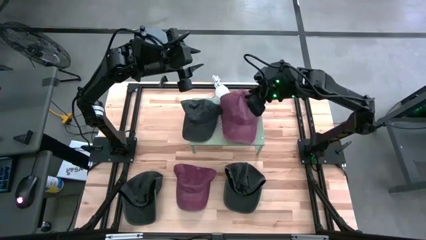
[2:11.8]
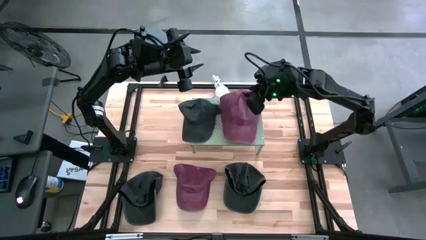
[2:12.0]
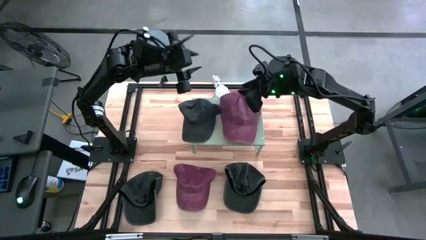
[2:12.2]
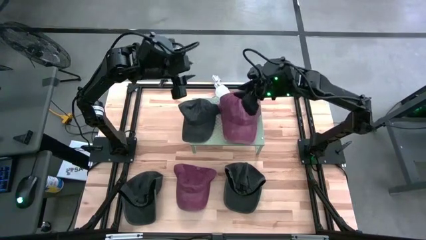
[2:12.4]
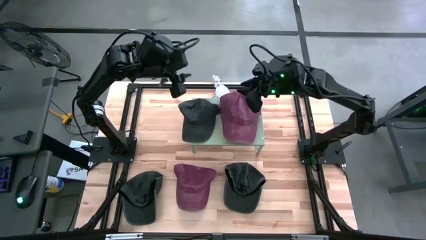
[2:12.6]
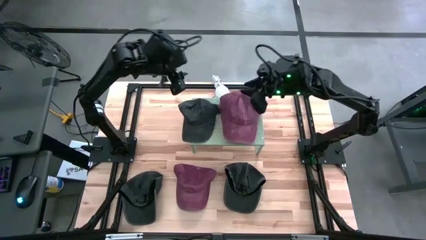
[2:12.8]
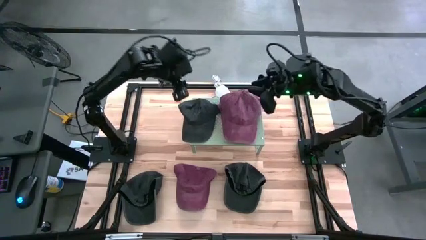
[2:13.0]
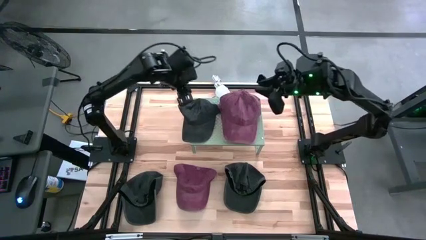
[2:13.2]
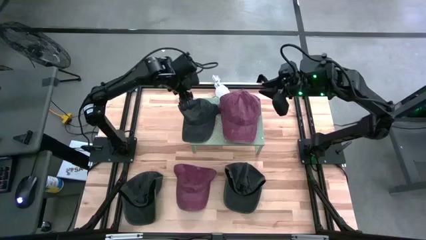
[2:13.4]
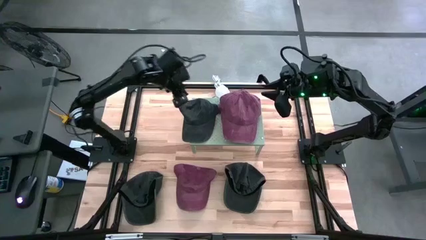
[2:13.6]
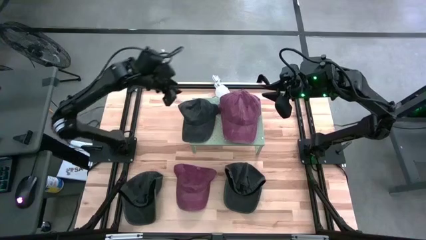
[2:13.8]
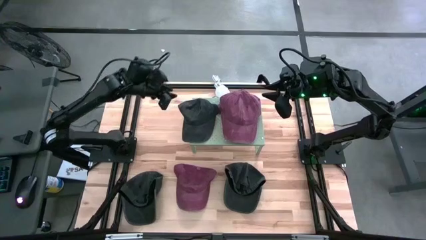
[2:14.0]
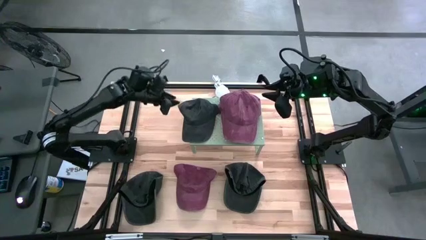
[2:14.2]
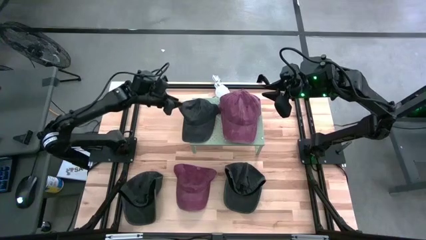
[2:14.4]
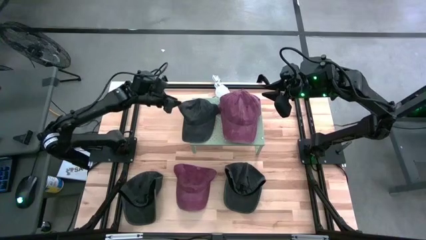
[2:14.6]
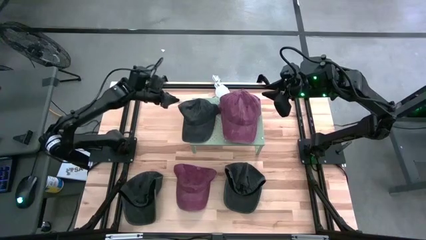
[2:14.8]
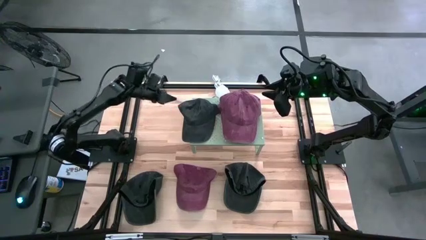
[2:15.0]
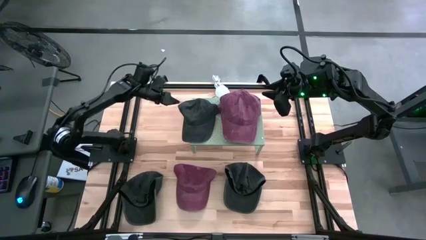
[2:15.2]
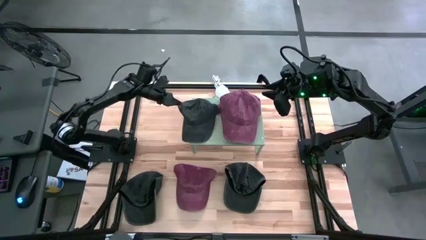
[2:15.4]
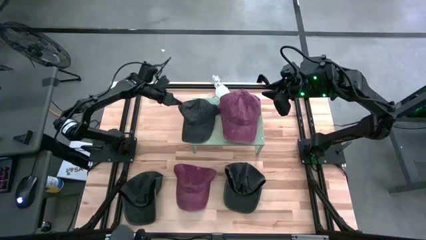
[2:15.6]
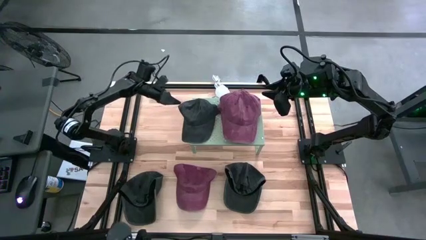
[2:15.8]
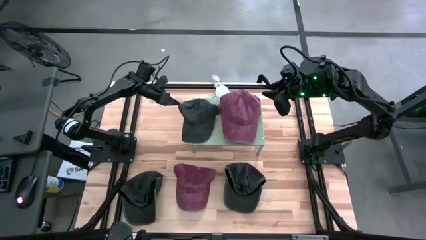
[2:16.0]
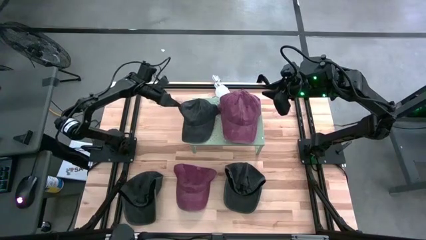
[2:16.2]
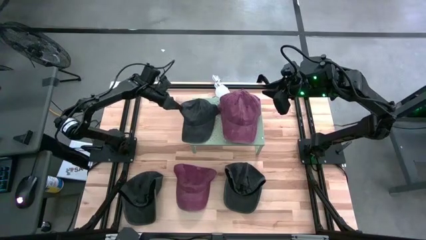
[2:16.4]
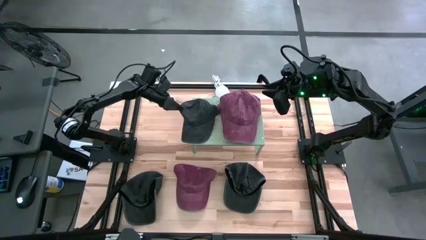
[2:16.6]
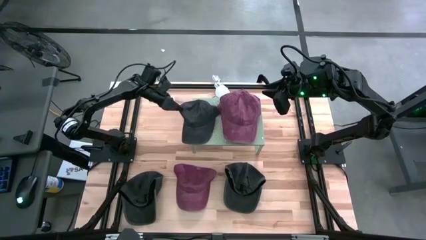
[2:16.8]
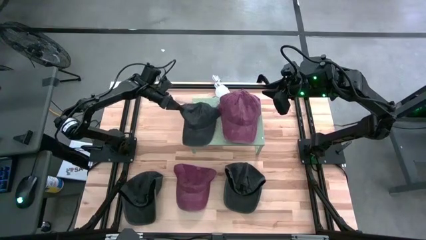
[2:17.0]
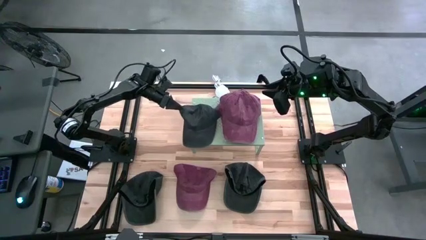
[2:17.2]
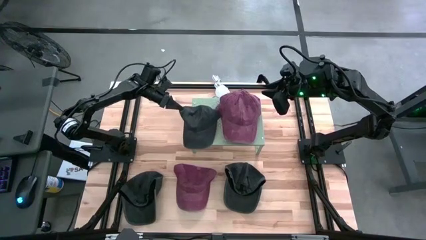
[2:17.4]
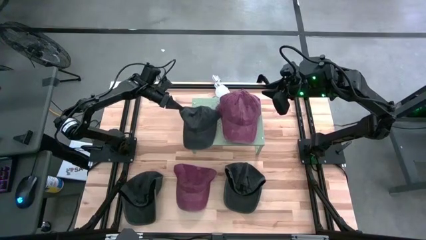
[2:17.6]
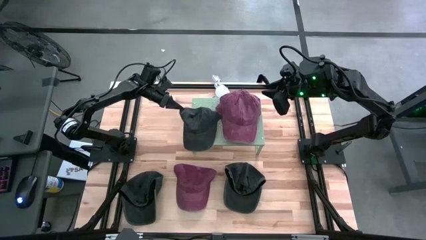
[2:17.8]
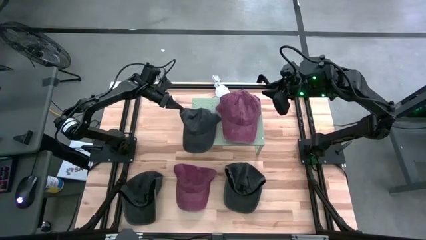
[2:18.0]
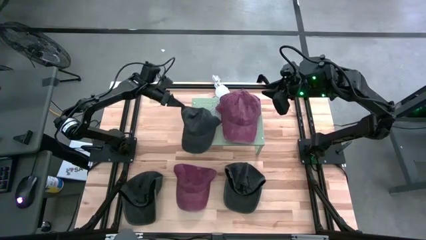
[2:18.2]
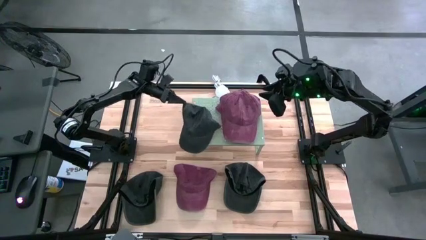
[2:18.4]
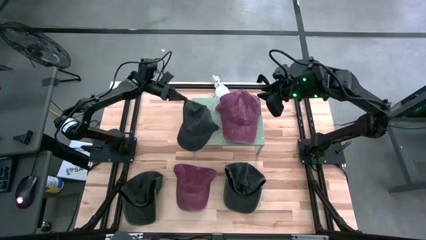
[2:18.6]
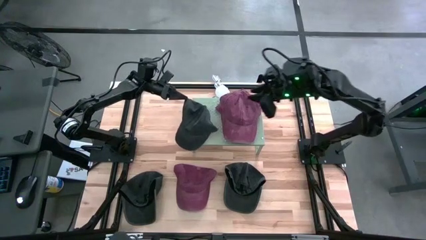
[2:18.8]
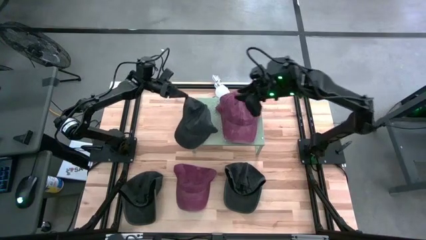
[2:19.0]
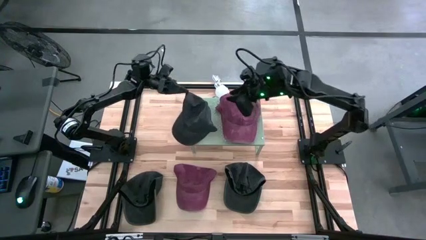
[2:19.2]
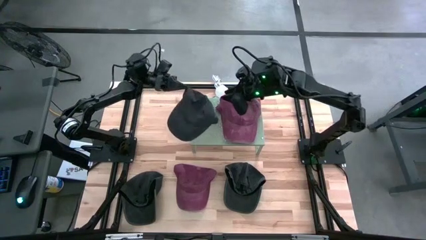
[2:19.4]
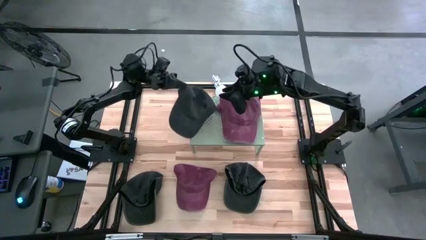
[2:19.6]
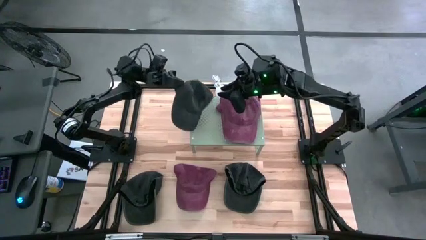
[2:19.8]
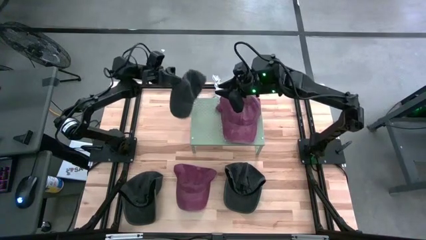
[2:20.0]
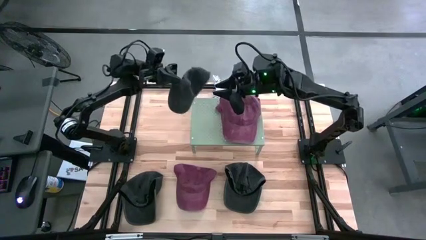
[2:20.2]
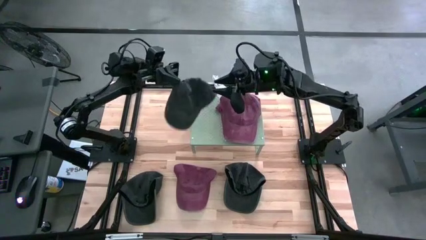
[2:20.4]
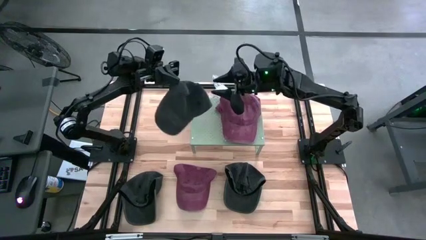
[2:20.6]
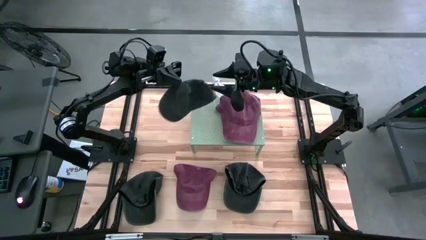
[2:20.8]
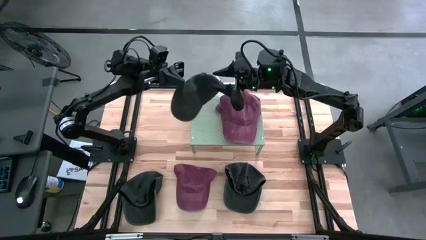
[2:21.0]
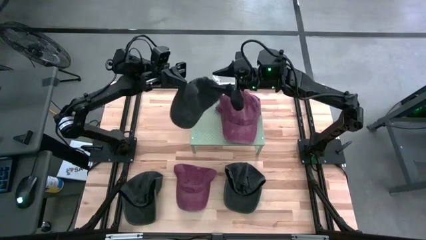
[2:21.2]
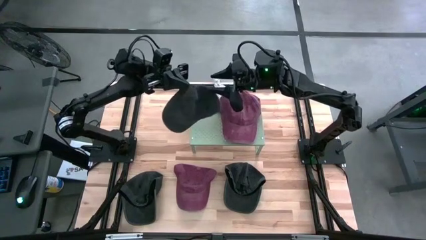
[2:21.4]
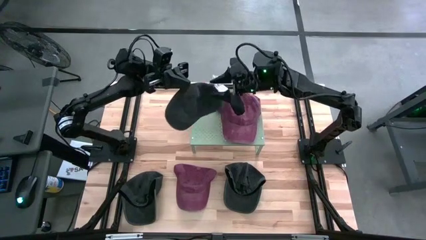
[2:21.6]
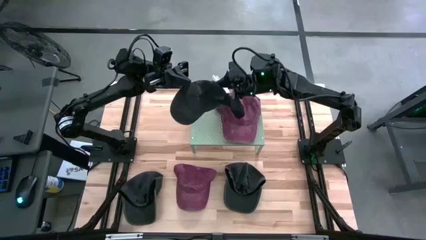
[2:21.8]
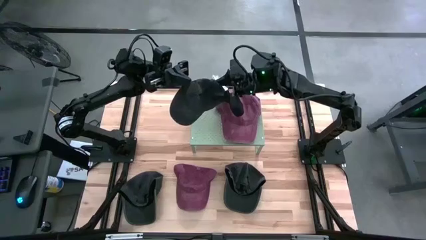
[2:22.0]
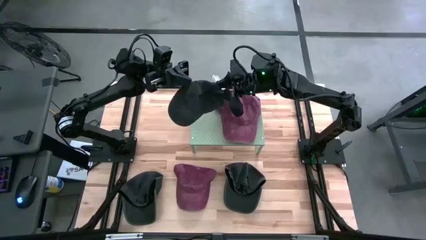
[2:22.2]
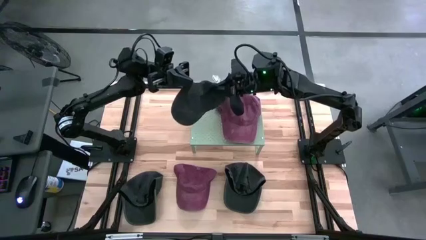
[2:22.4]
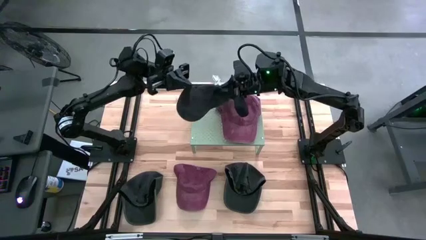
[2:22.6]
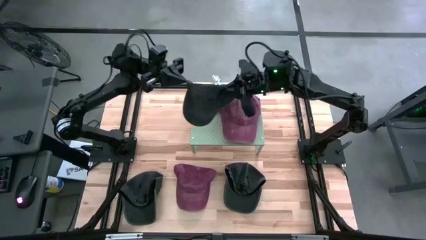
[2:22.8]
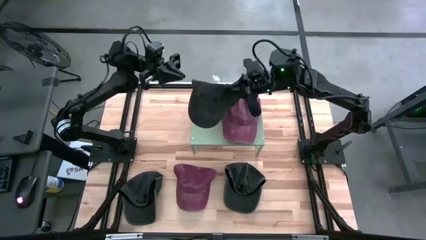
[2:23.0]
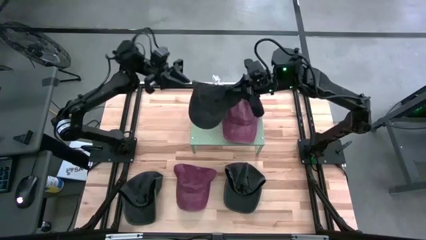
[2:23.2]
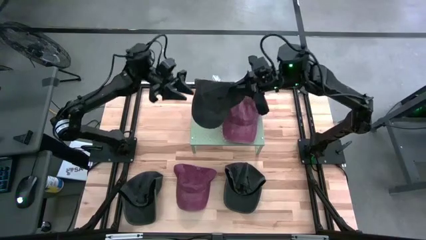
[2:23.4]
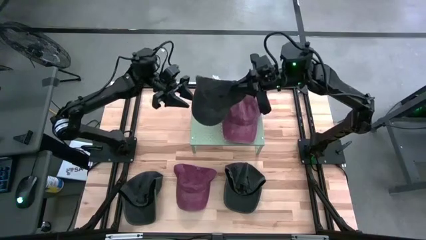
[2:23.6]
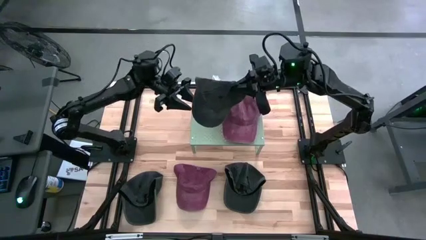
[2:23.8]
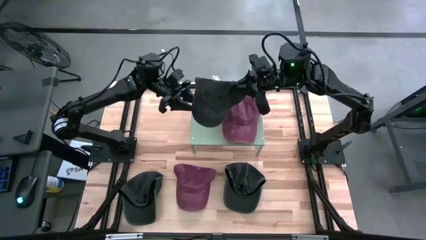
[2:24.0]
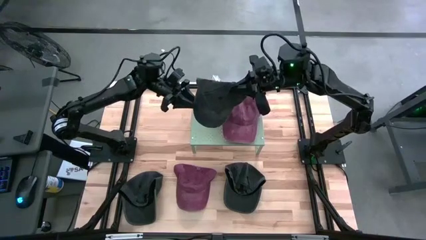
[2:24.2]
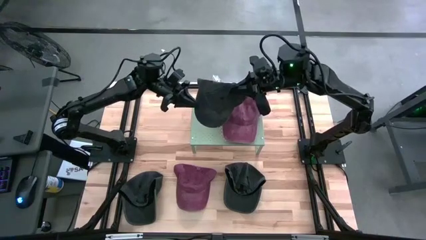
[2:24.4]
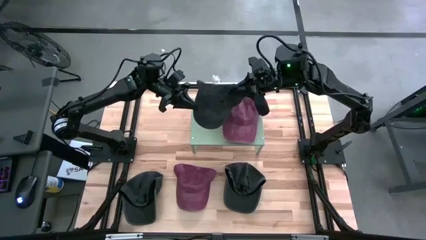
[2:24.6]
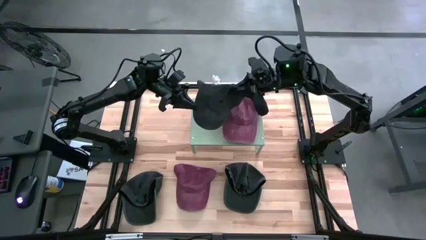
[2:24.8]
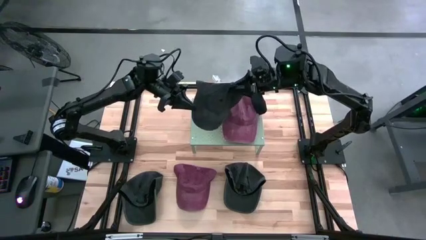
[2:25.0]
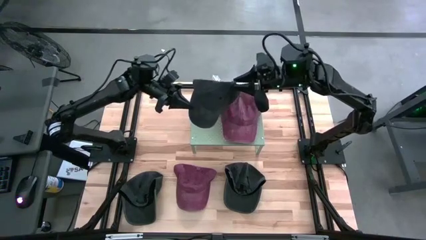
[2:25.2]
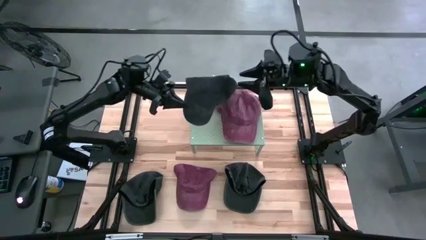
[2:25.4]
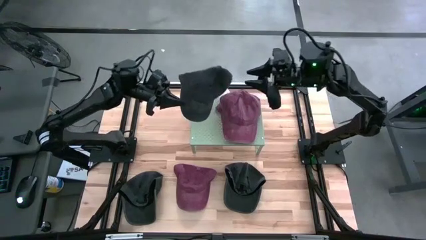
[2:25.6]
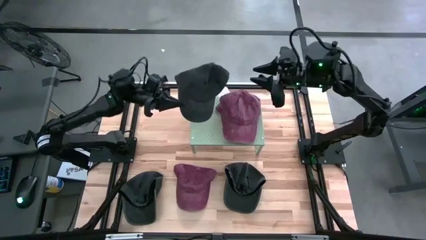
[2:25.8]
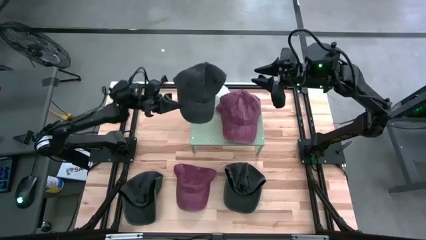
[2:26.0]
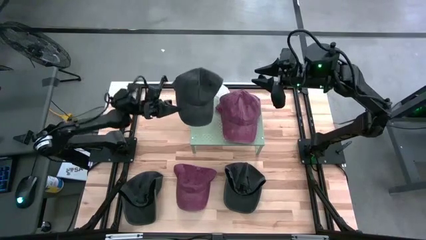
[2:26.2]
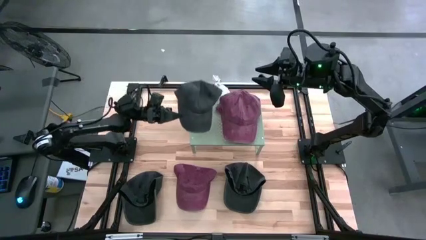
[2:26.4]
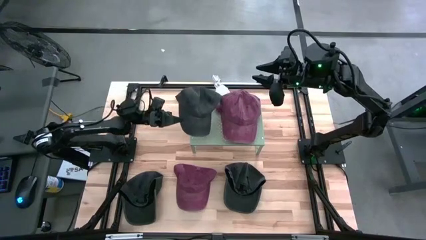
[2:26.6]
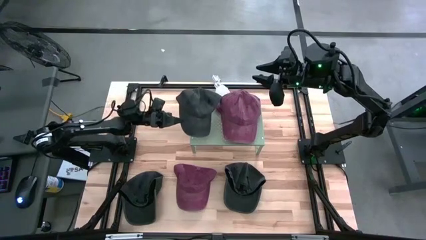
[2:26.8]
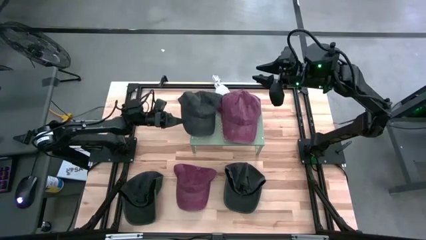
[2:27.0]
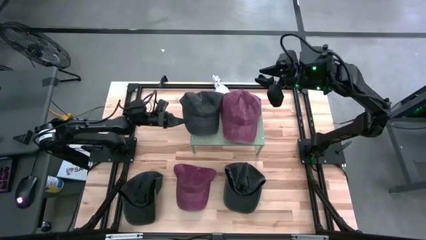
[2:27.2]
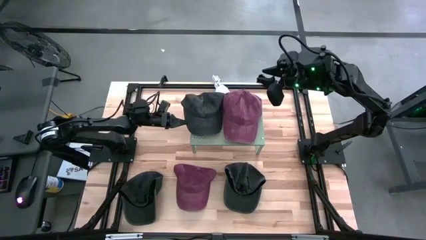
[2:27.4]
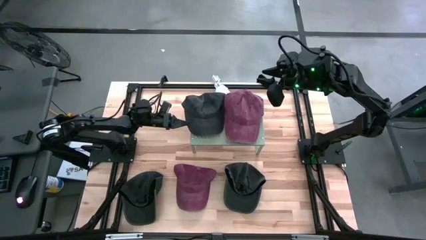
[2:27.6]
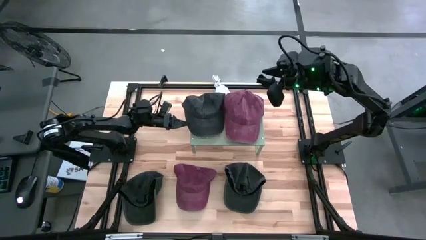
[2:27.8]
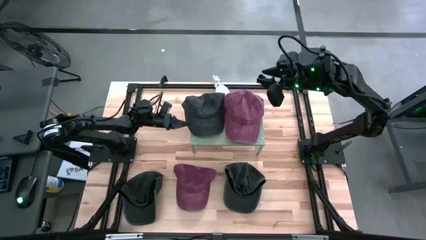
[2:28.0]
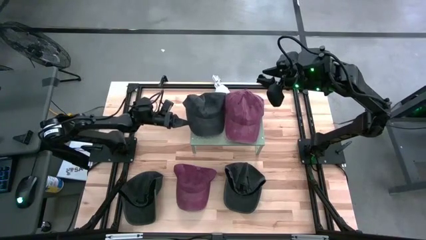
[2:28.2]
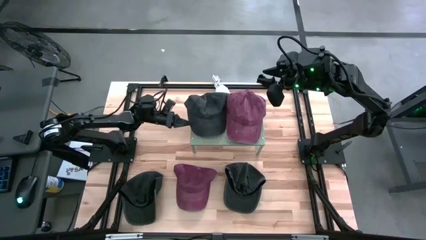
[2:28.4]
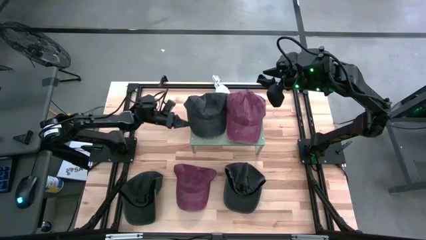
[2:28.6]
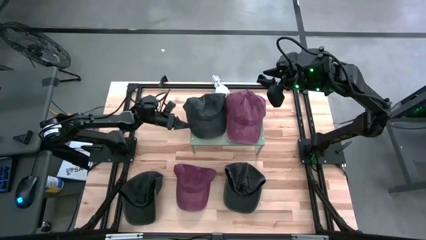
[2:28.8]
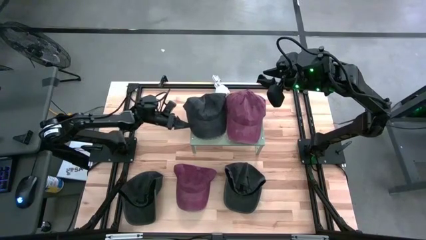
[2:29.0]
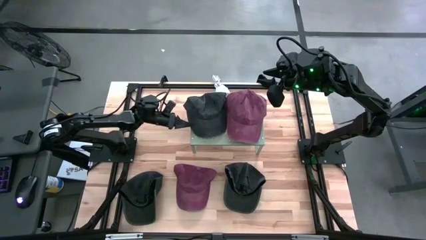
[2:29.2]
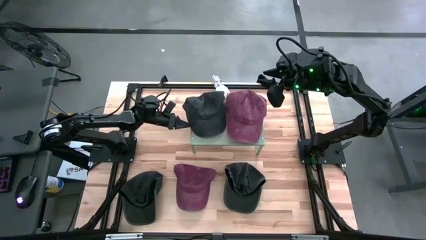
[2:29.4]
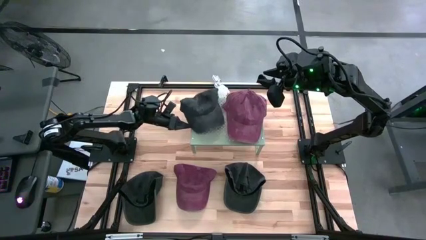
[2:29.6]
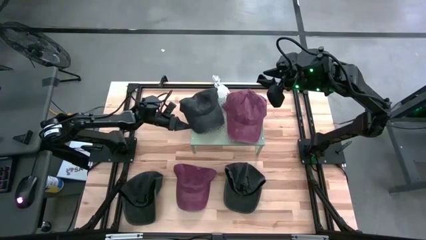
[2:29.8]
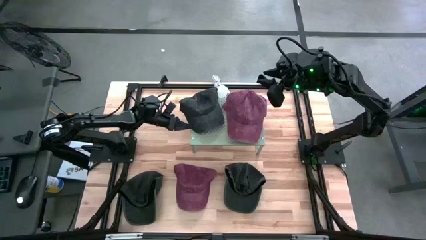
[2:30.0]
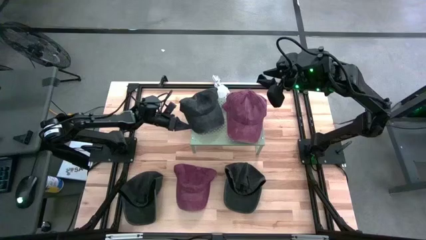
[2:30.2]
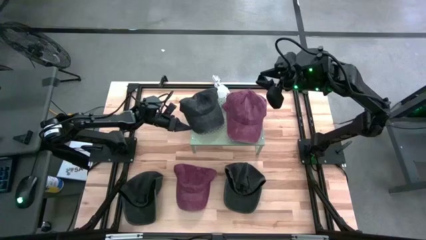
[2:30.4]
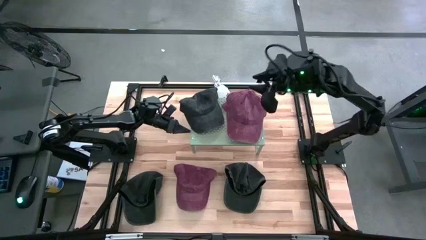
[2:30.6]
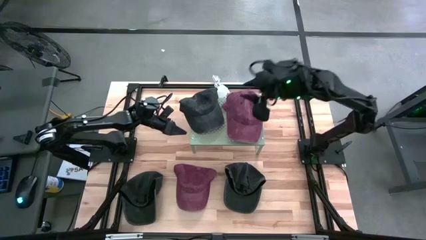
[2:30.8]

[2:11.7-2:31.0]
Task: Pick & Place hat
Adjust the black cap on the shelf
